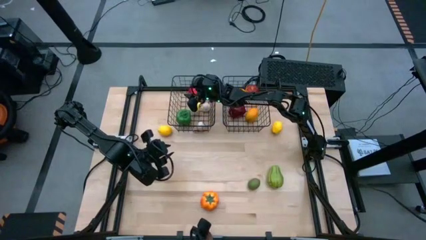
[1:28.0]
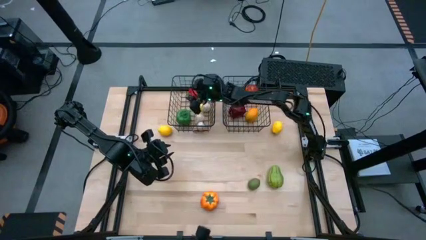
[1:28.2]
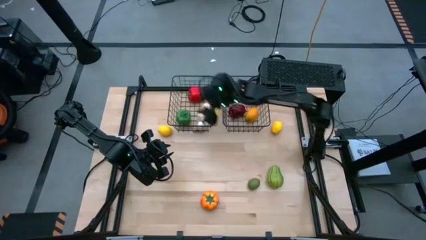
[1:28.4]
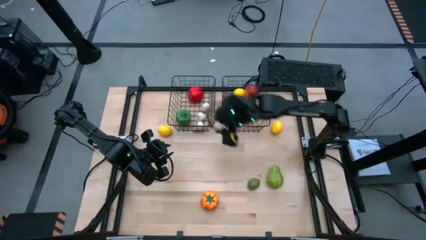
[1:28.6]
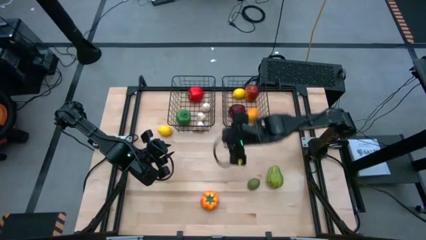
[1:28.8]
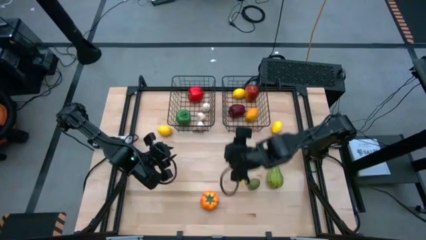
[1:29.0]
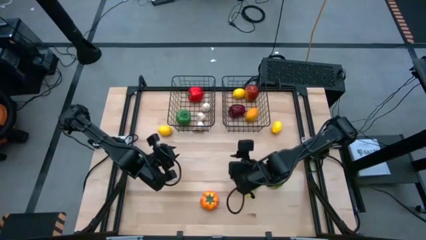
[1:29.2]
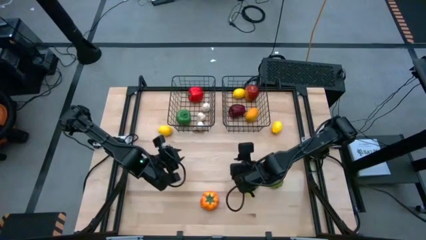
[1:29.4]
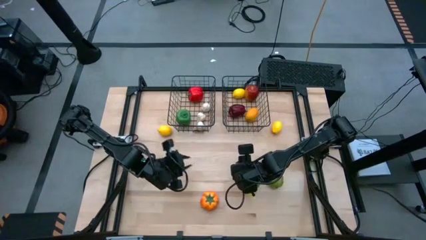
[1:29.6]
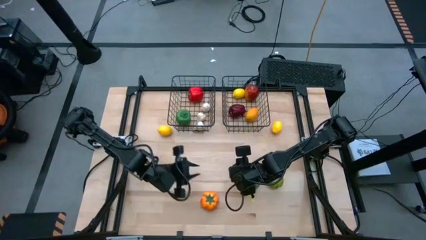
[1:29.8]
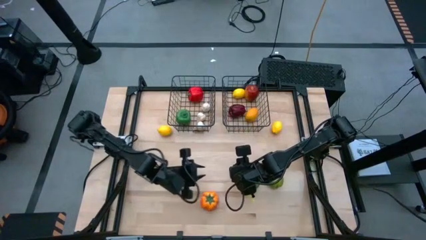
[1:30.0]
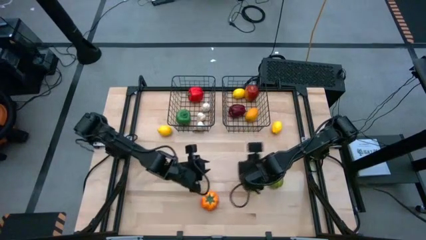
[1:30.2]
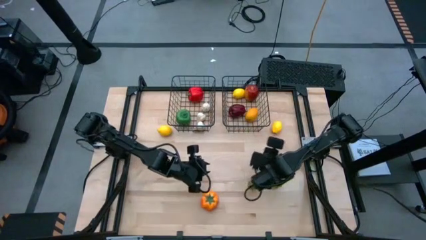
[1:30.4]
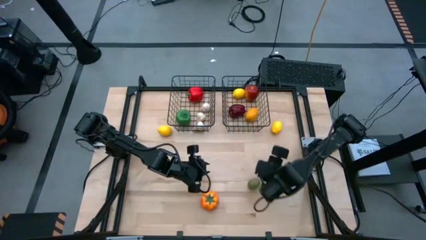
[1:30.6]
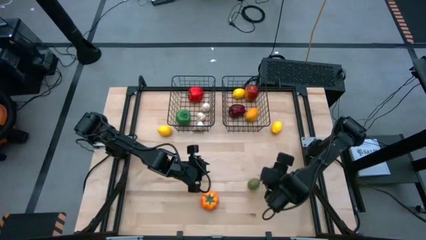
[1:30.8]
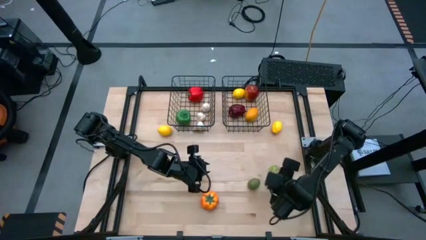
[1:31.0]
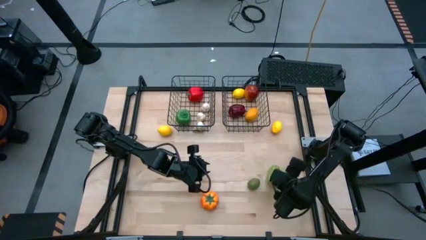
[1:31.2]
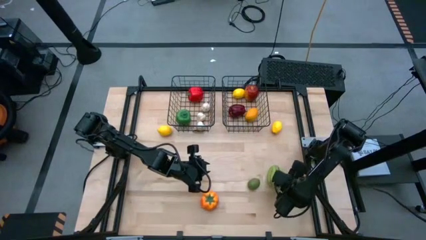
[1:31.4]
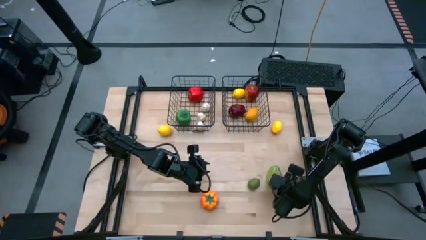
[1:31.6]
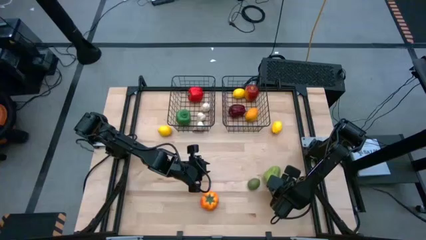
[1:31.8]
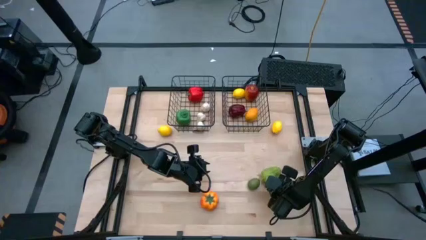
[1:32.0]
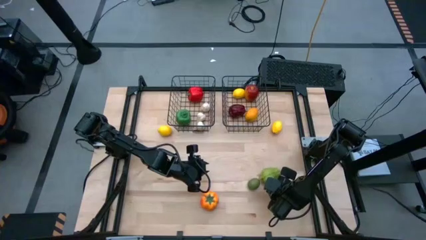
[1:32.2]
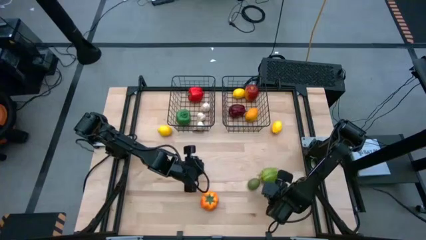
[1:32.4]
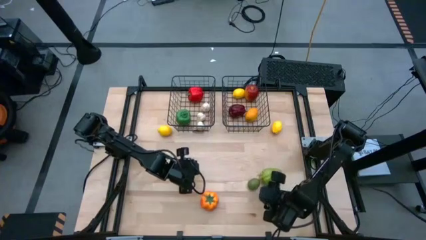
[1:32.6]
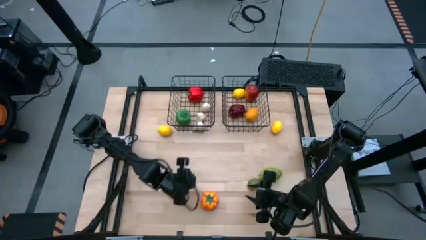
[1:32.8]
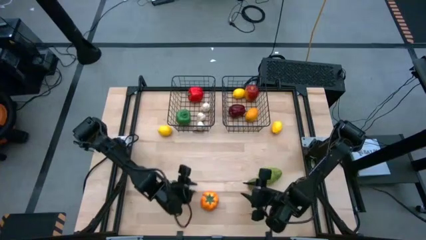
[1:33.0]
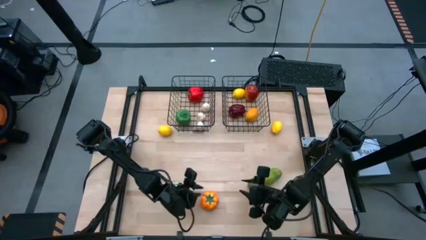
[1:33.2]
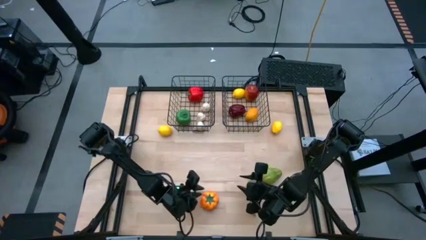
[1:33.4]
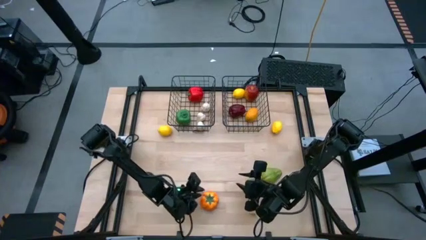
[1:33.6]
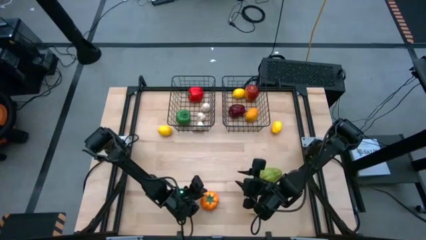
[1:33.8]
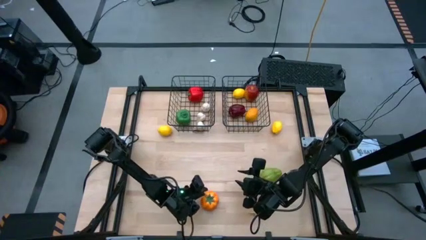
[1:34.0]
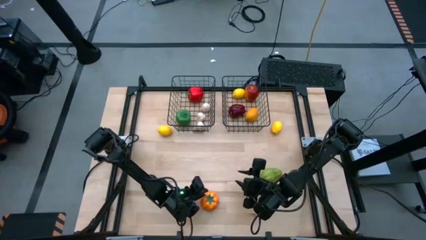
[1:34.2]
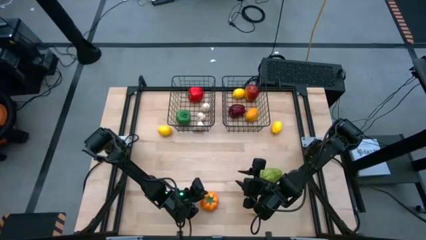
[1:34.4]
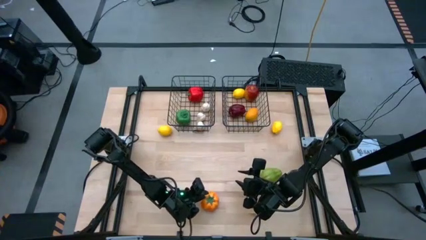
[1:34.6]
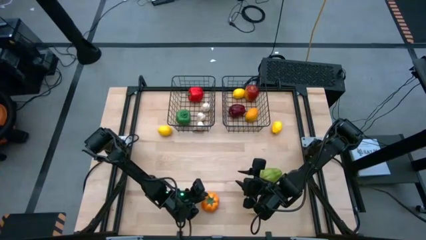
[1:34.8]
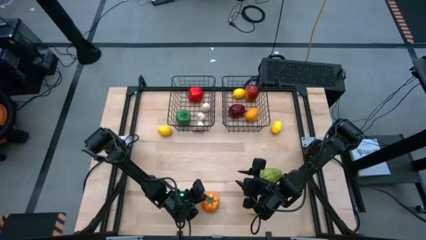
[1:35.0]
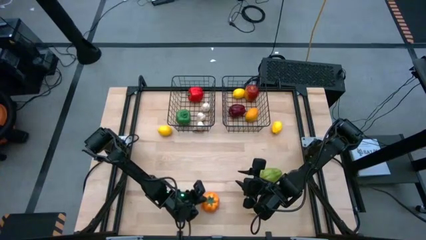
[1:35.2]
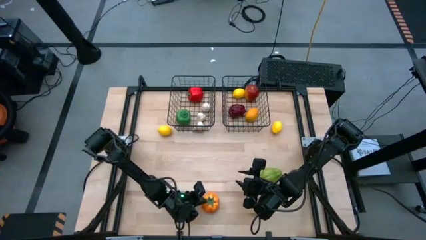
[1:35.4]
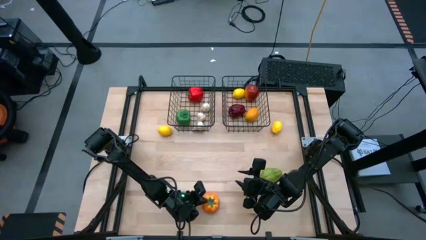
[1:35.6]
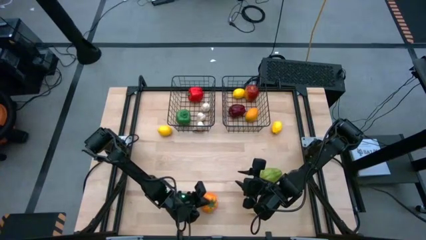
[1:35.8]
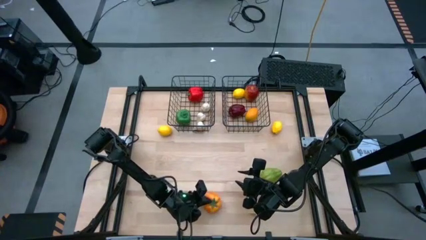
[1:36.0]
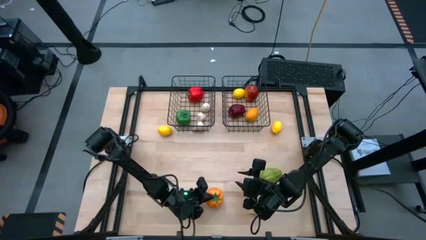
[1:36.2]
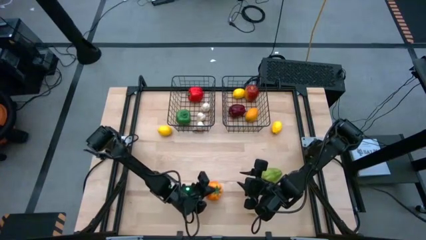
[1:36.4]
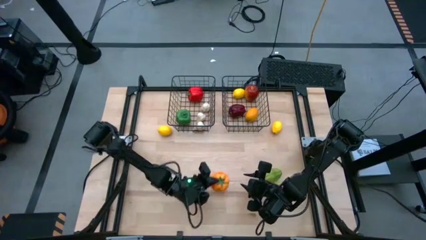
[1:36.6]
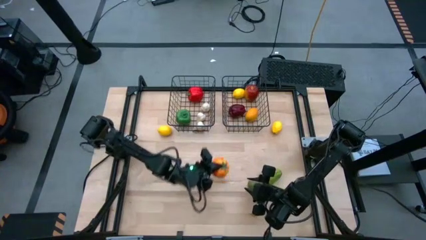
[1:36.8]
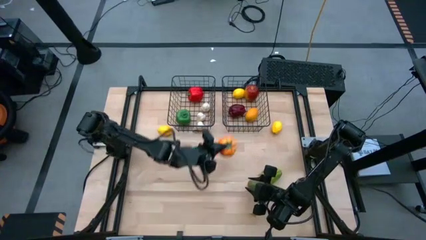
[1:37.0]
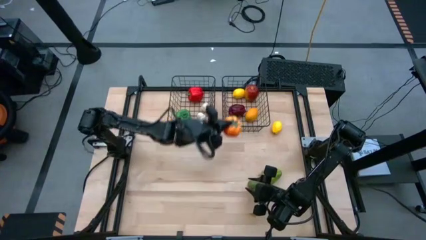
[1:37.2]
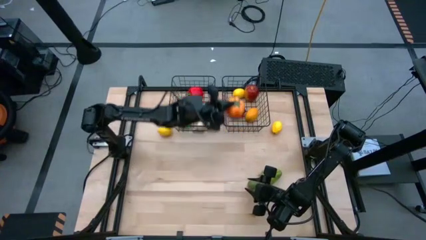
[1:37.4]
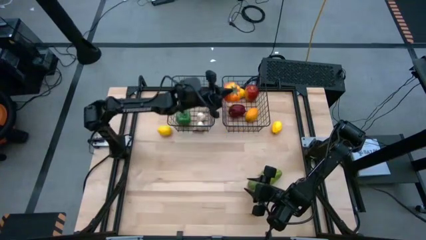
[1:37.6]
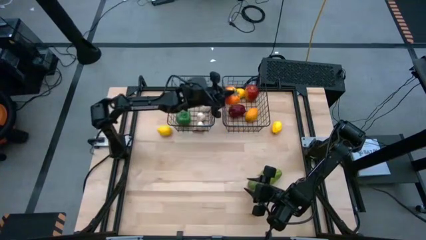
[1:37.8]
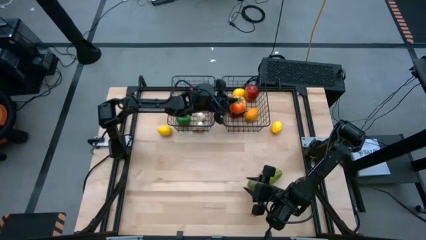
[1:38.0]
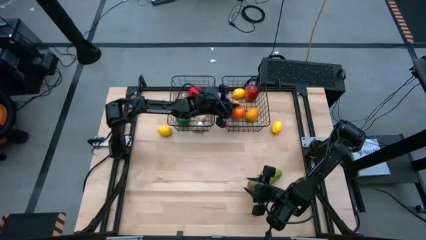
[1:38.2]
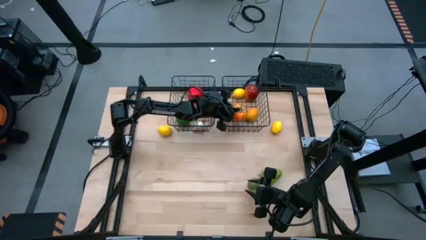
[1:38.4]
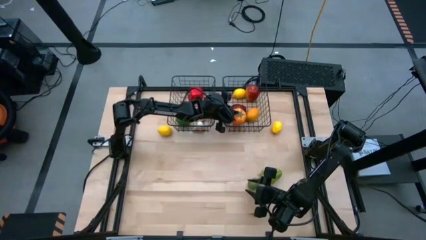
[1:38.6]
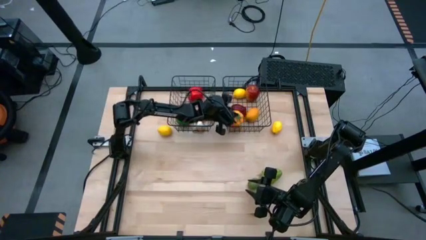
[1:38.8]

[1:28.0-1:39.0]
Task: Sort produce into baskets
Put the orange tomato into the right wire basket
